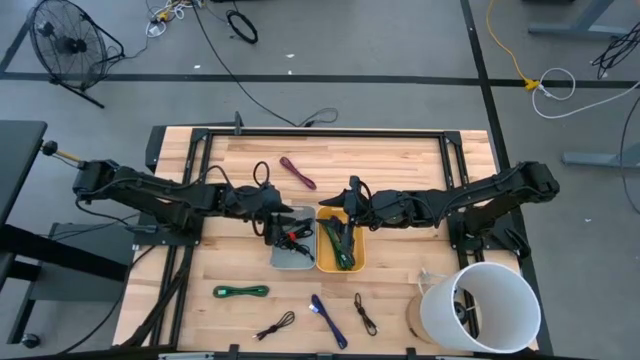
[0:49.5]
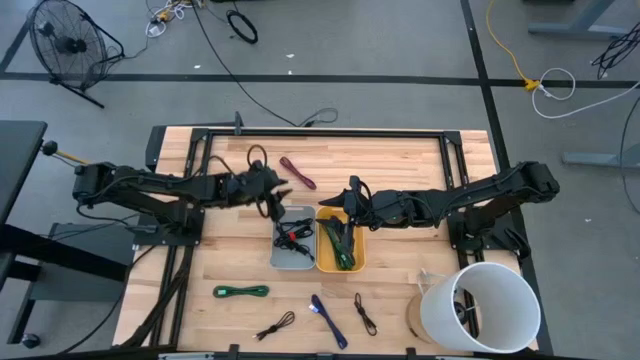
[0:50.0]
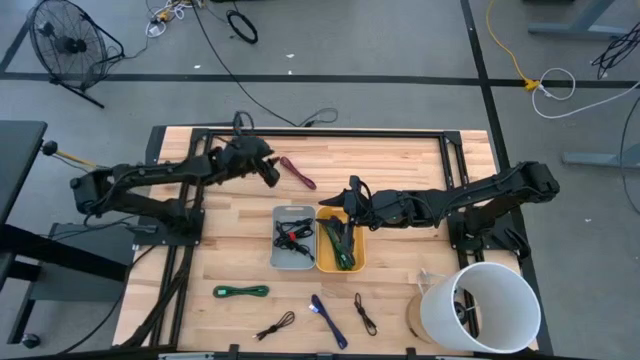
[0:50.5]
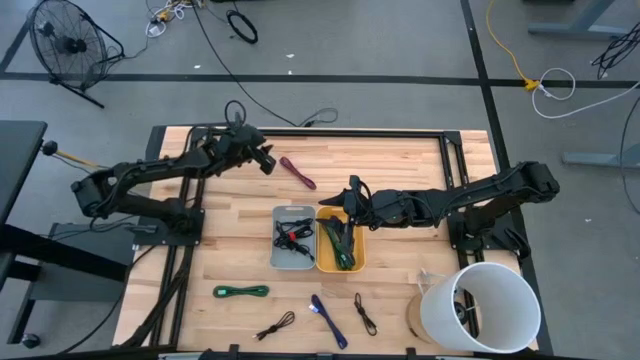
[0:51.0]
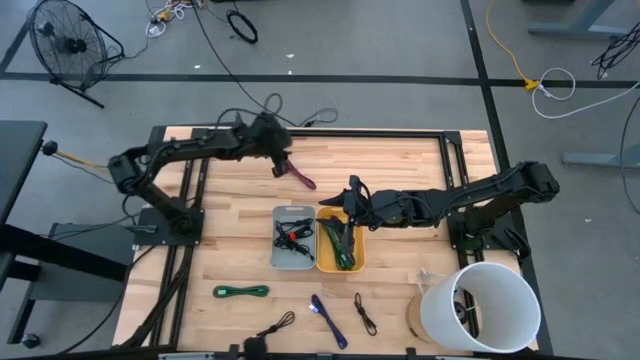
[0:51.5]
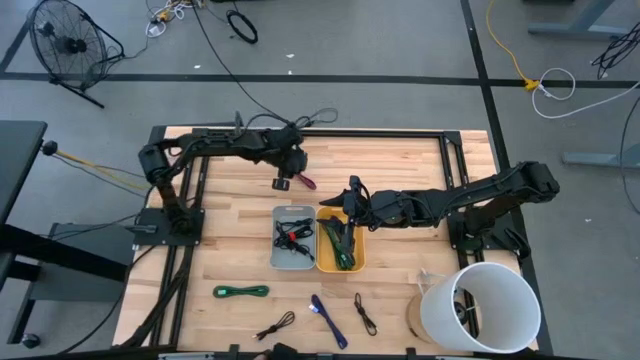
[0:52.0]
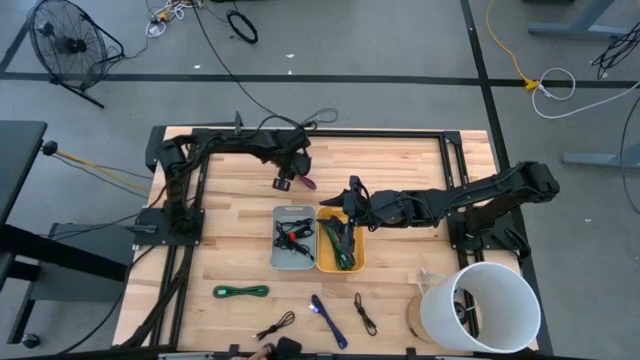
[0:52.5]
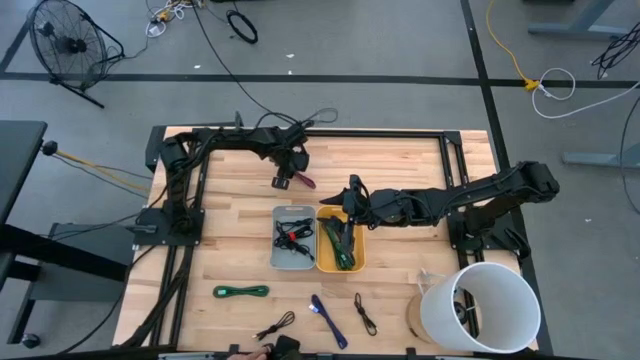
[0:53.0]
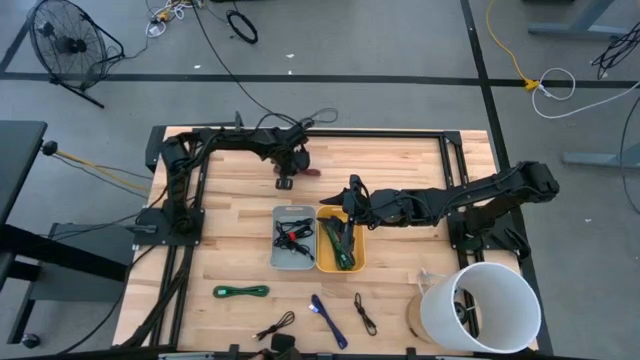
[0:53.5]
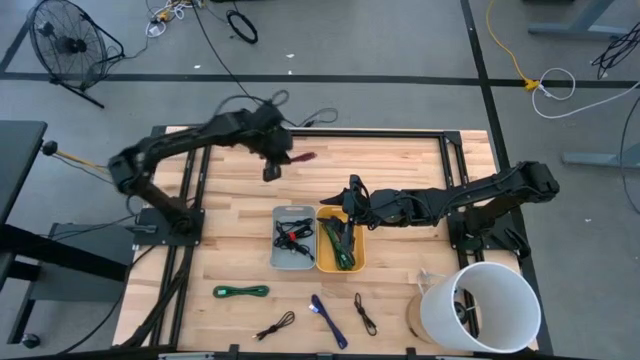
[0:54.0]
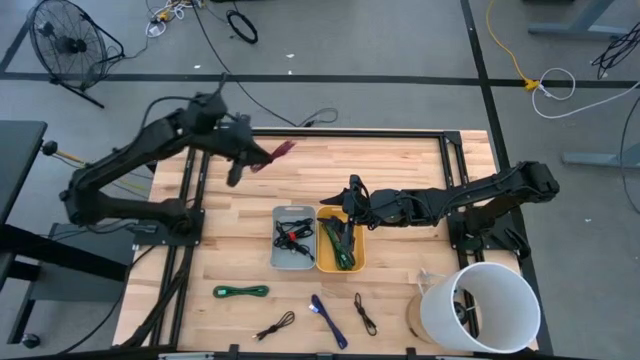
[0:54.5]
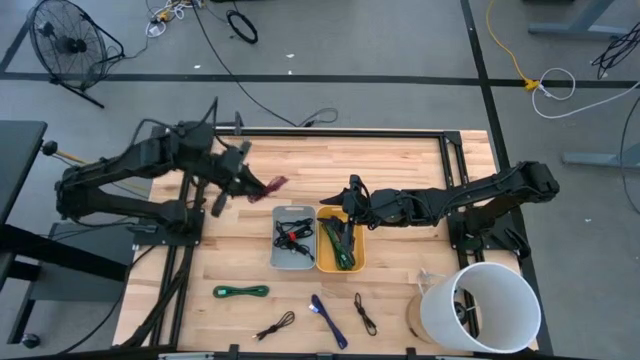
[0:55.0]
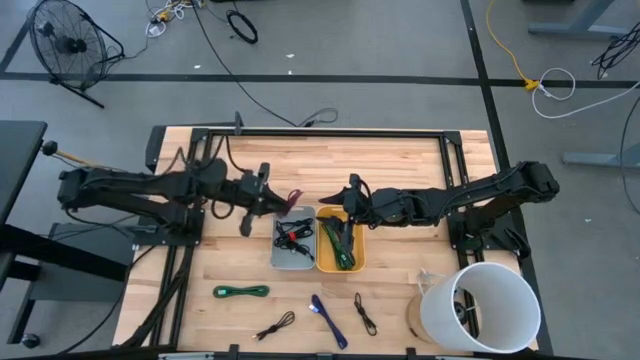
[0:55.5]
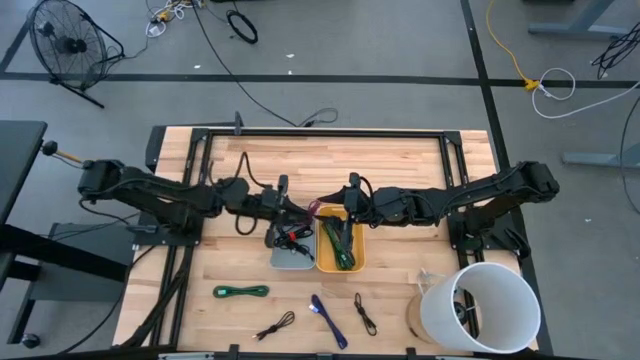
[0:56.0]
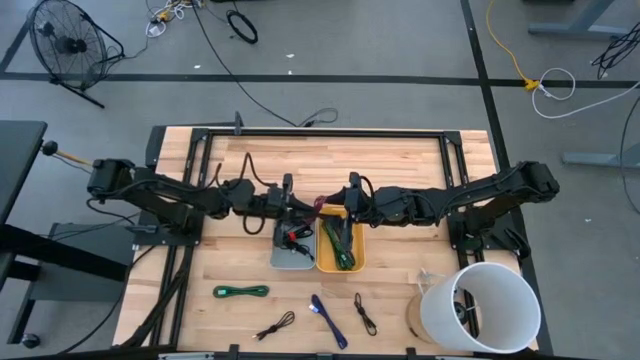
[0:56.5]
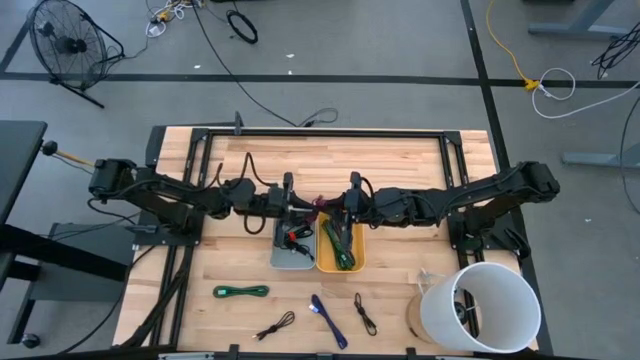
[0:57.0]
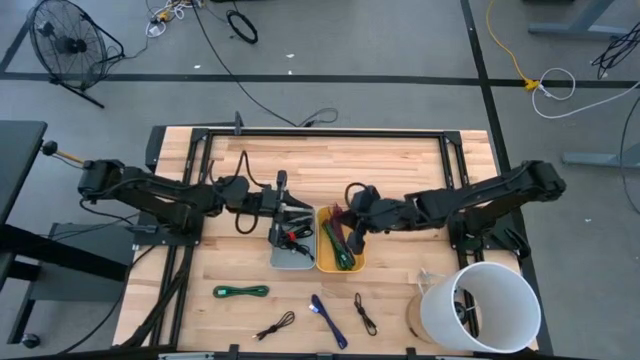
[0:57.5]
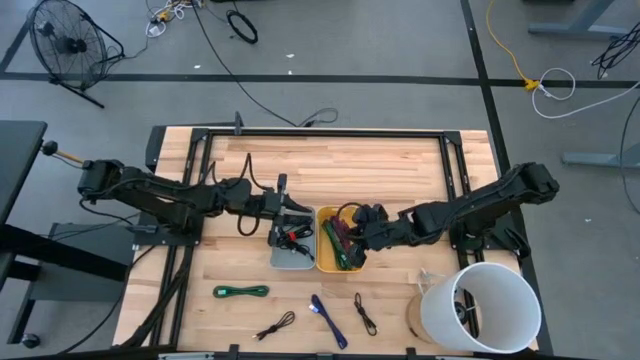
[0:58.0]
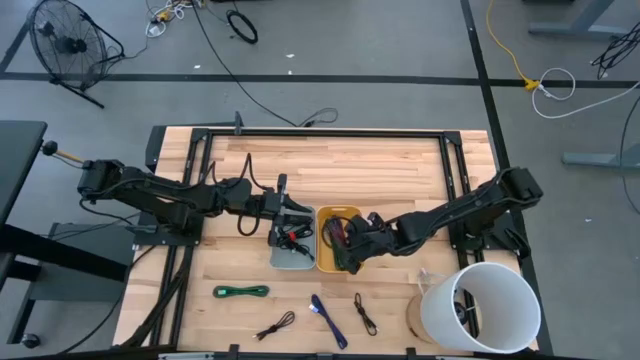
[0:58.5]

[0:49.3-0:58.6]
Task: Pick & Place USB Port
Put the pink charger cable into the yellow bin

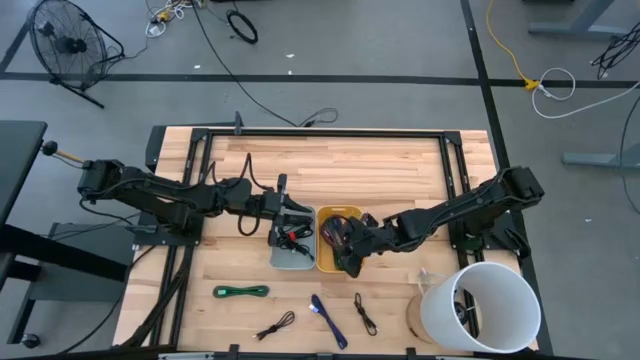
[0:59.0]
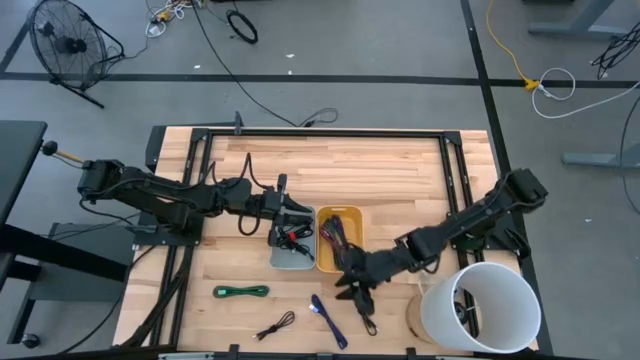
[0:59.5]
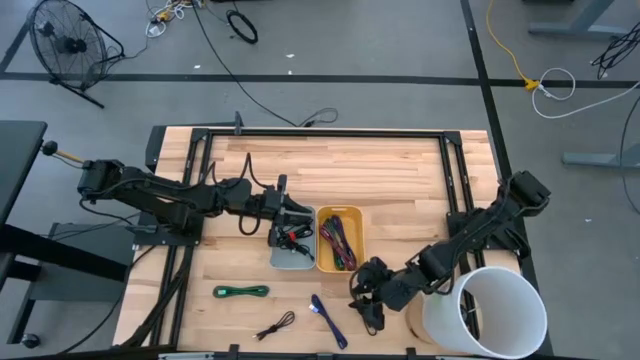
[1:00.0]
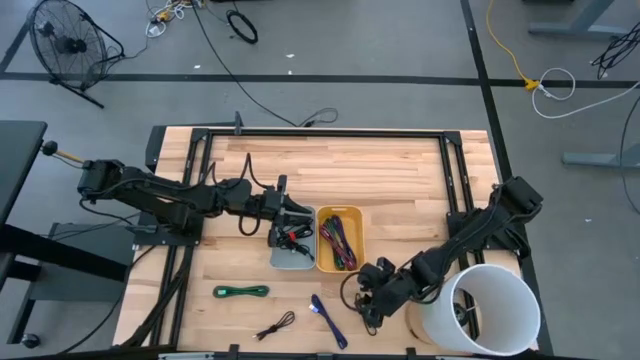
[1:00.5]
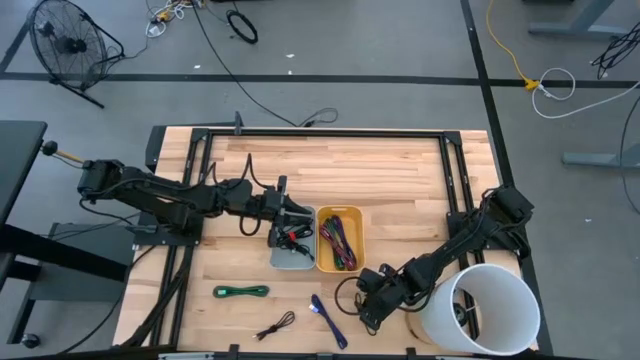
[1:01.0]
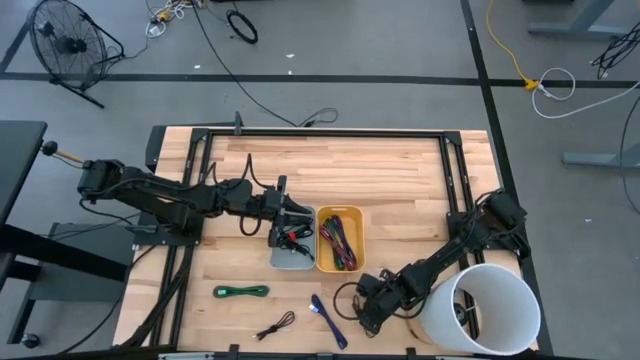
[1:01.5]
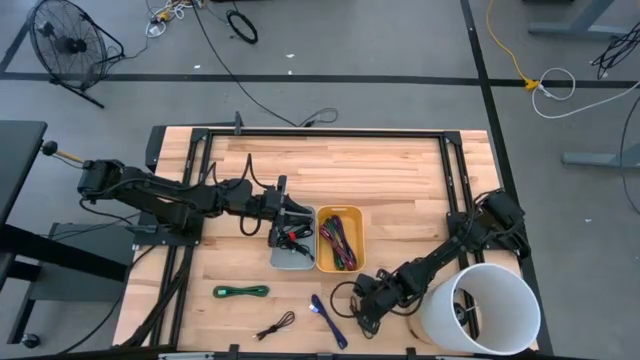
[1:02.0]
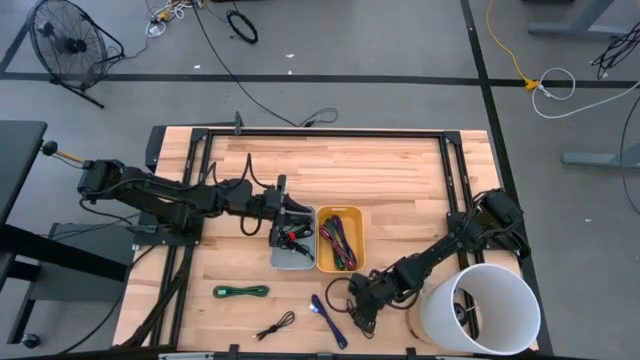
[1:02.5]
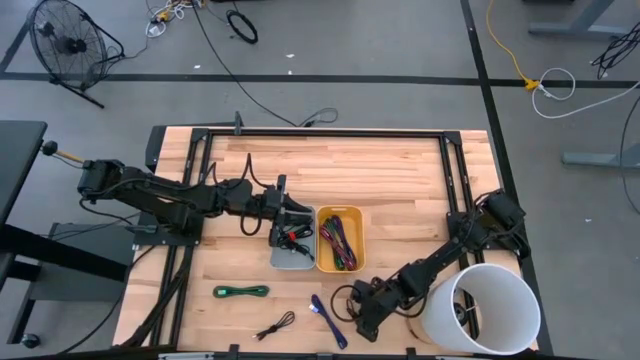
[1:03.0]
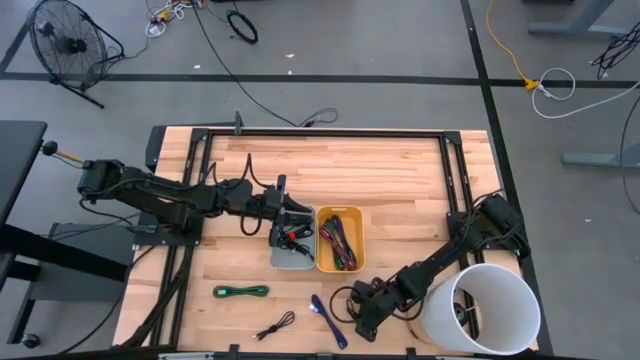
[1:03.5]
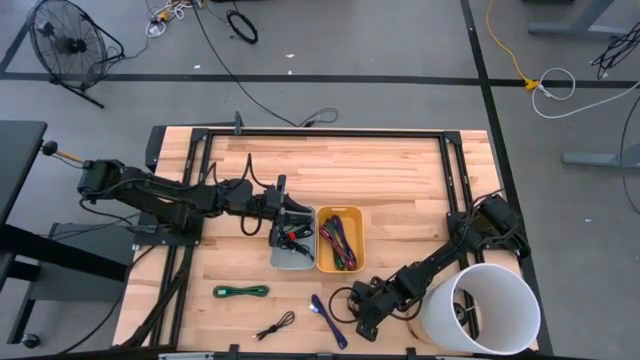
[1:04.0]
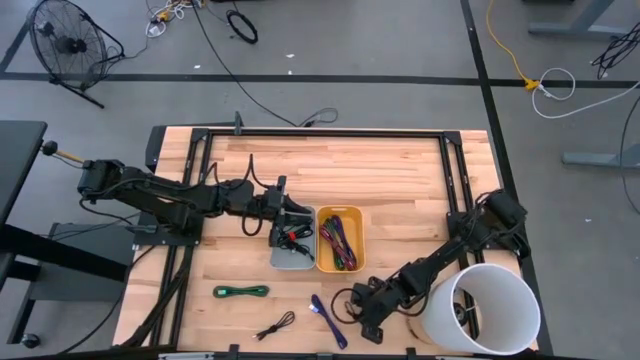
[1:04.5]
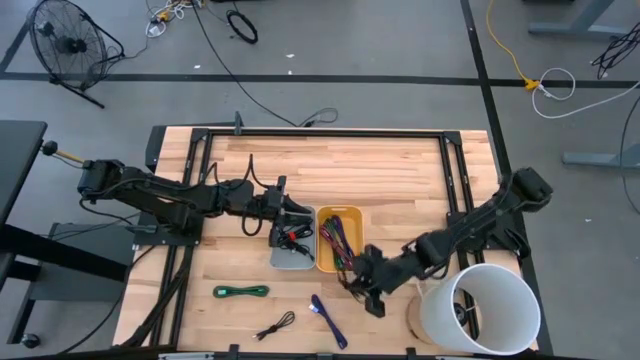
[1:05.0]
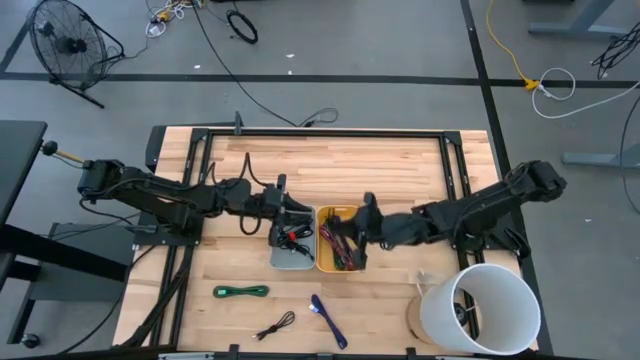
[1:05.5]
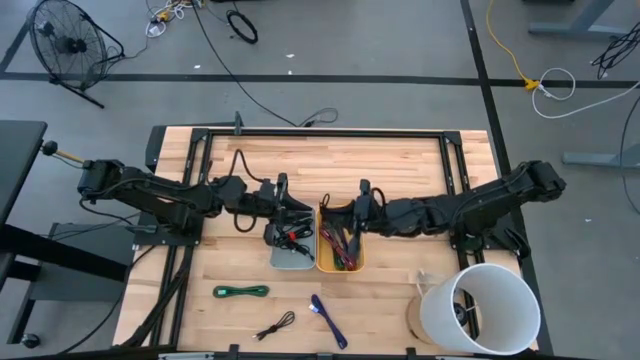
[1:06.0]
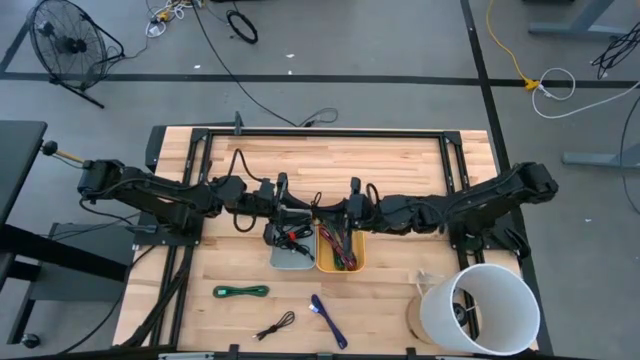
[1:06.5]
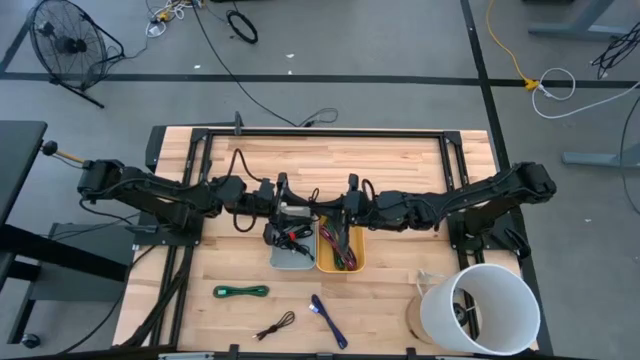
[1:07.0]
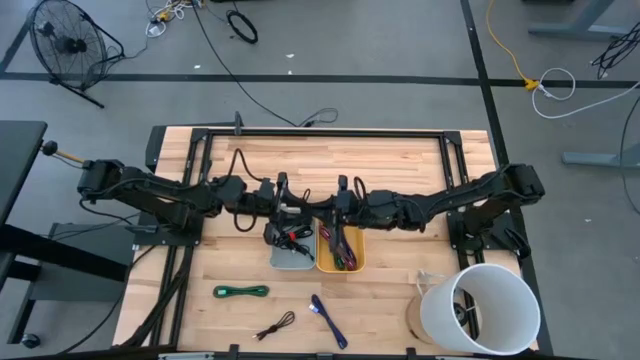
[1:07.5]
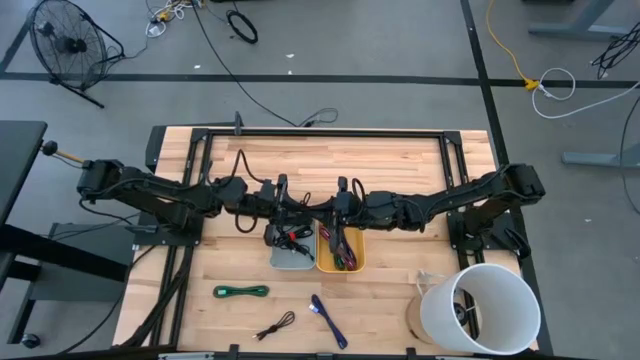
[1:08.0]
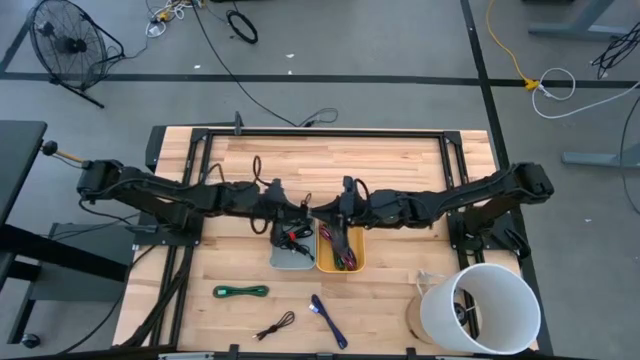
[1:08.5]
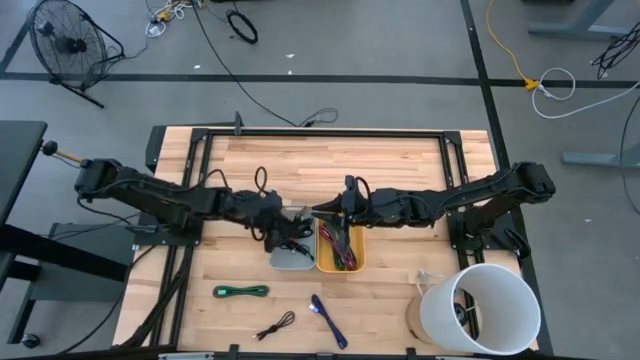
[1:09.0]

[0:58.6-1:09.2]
Put the black charger cable into the gray bin

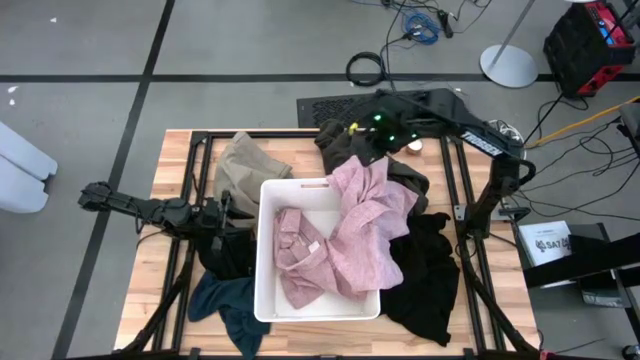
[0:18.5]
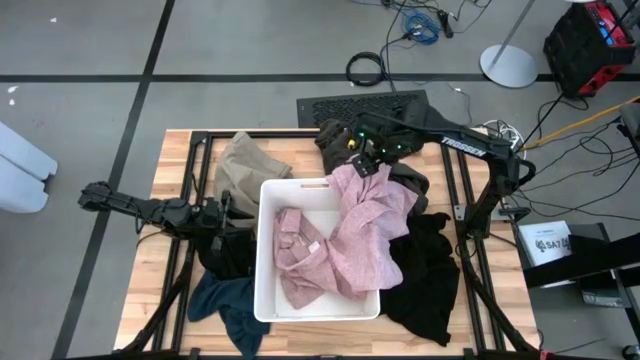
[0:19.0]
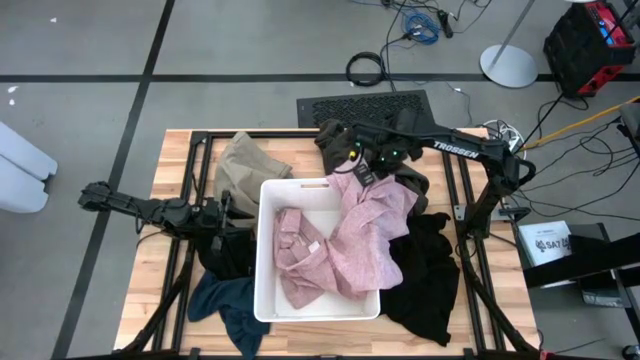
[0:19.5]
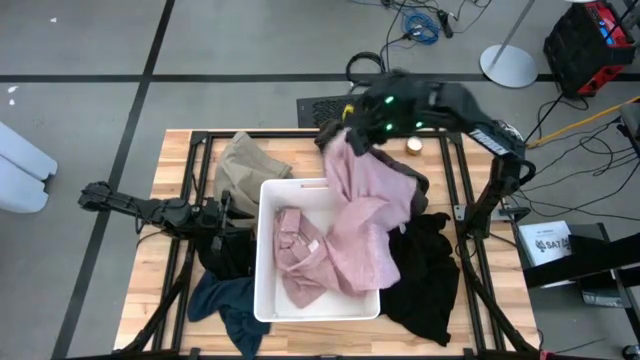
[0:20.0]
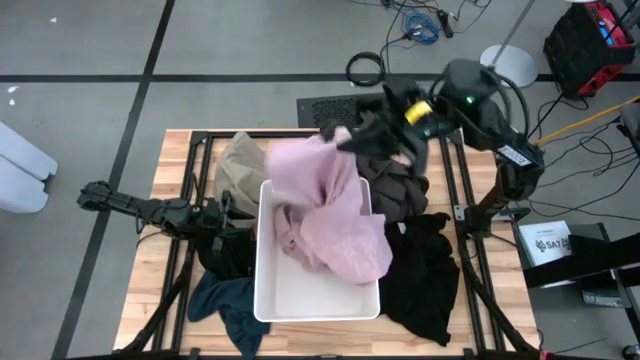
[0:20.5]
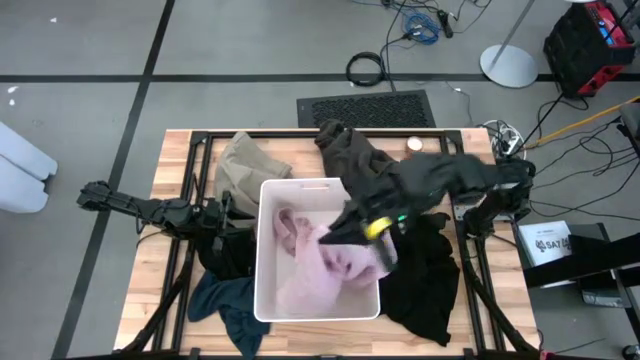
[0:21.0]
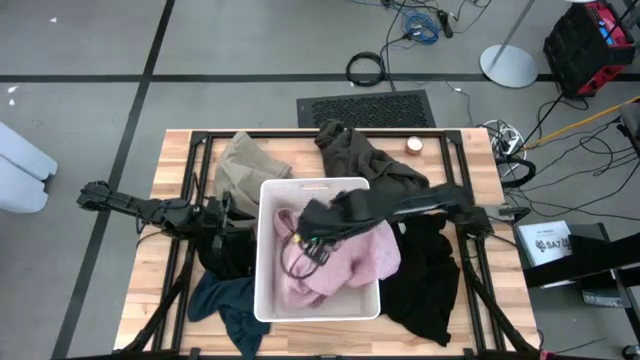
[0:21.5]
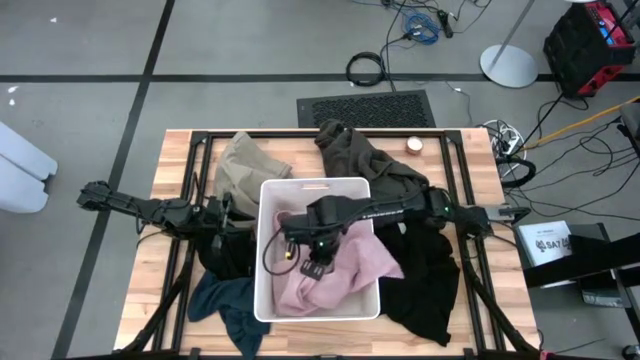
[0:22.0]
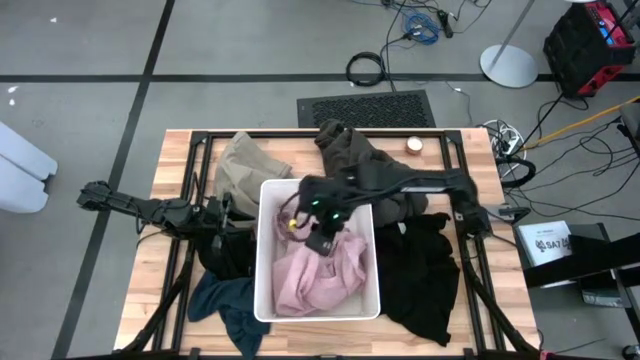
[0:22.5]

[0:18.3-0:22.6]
Task: Sort clothes
Put the pink shirt into the white laundry bin
